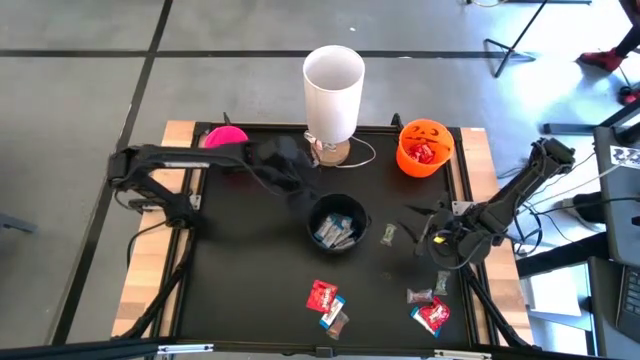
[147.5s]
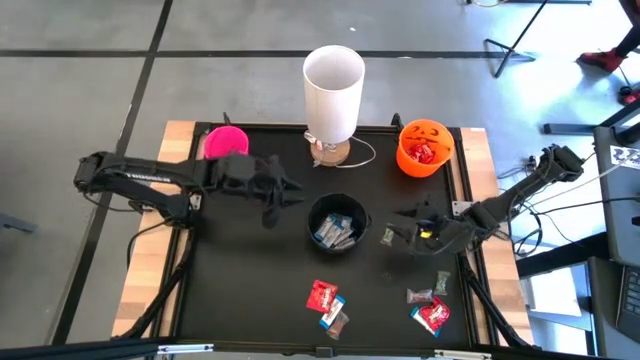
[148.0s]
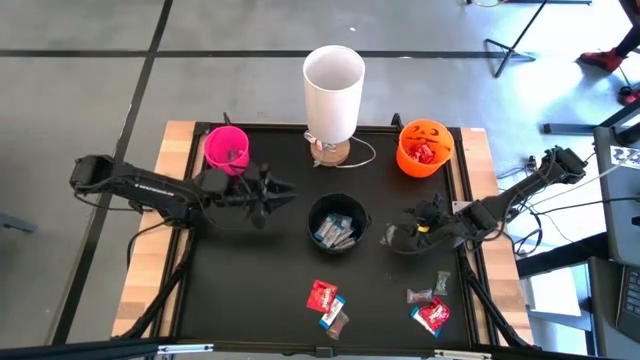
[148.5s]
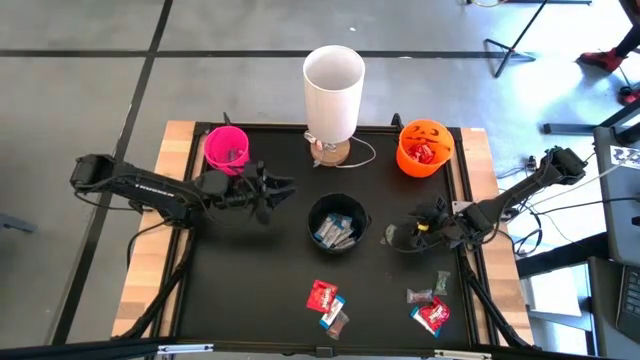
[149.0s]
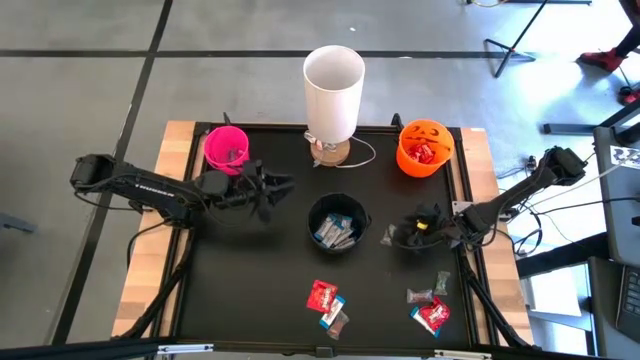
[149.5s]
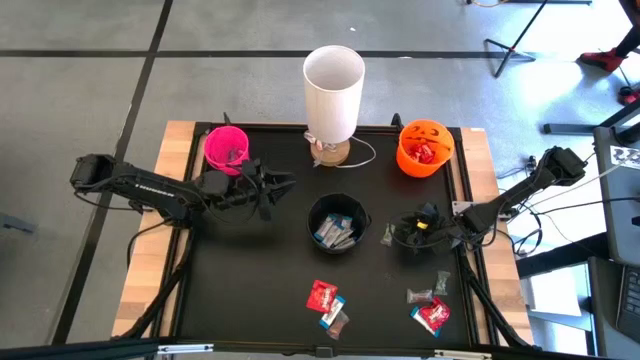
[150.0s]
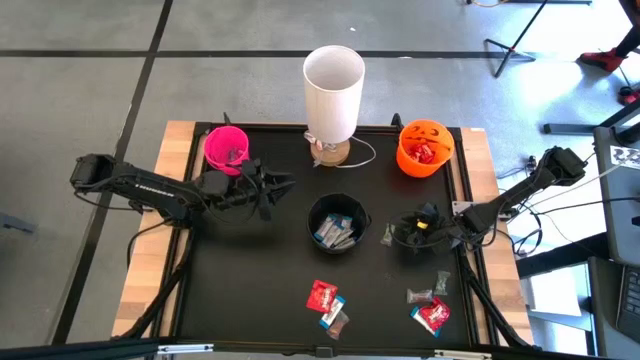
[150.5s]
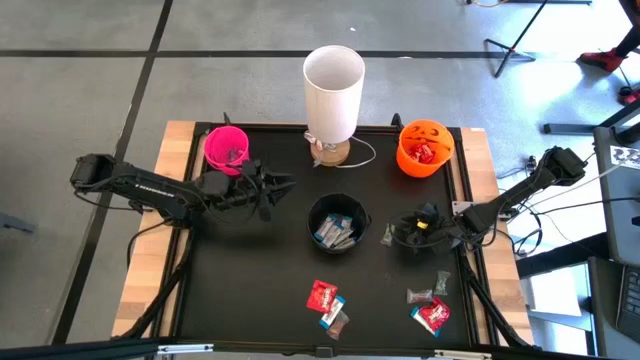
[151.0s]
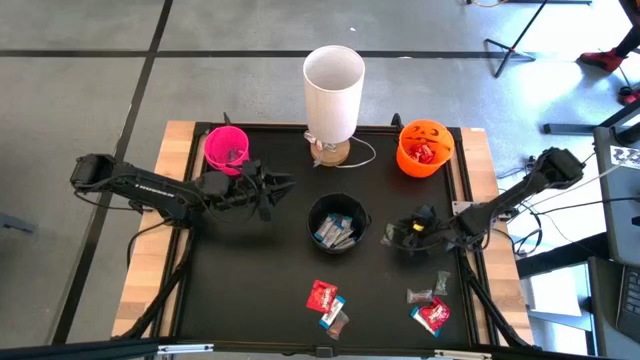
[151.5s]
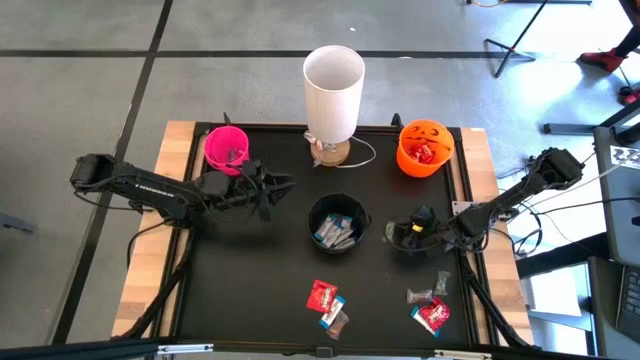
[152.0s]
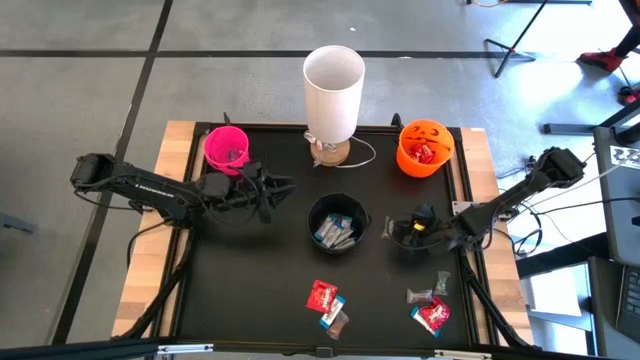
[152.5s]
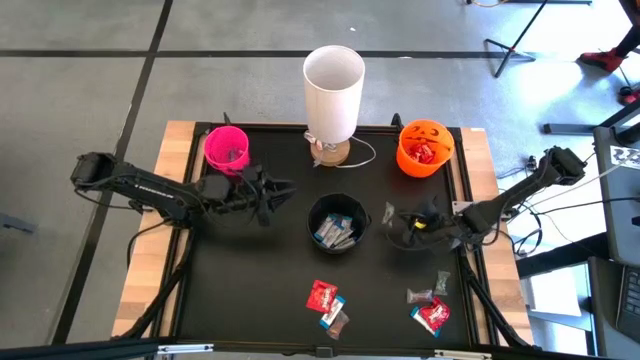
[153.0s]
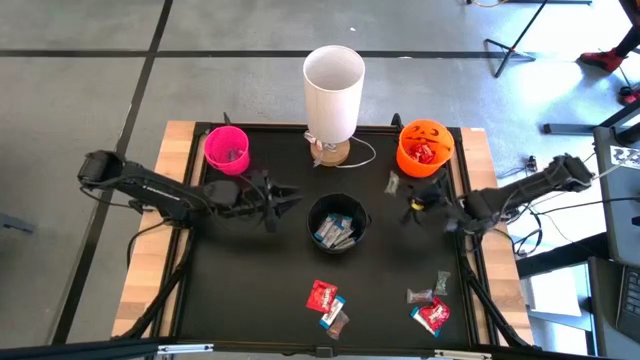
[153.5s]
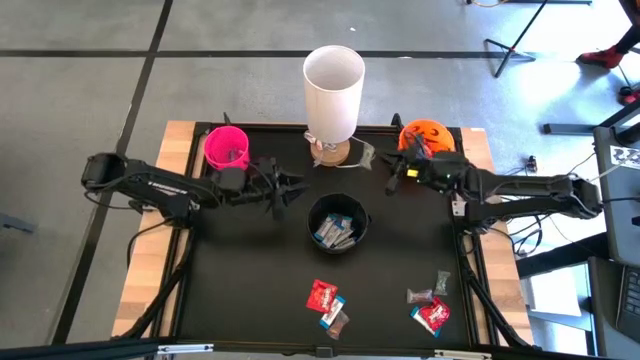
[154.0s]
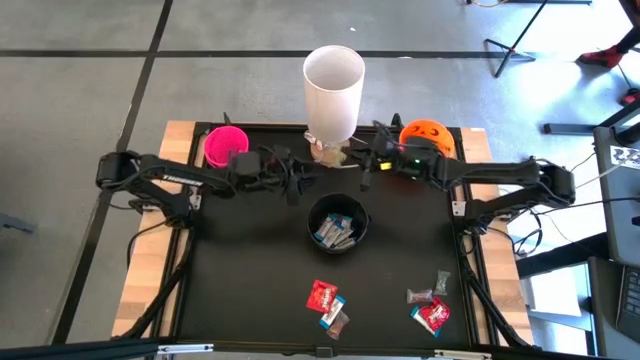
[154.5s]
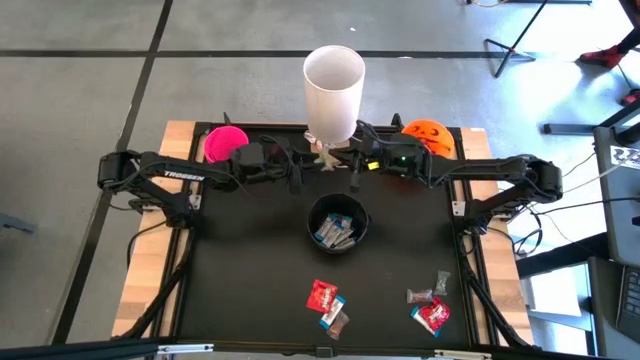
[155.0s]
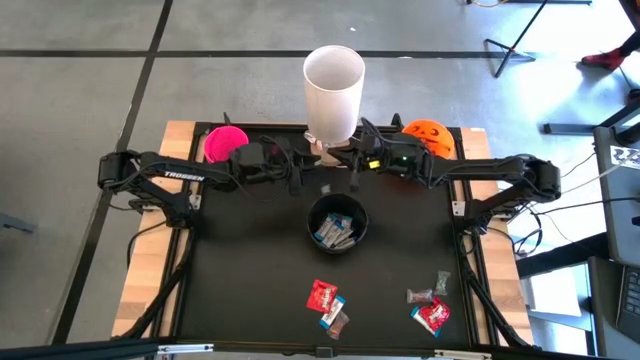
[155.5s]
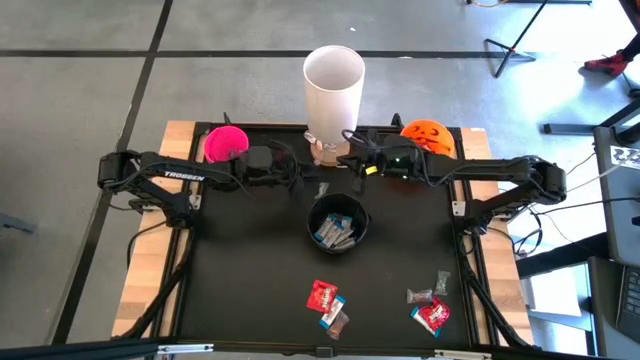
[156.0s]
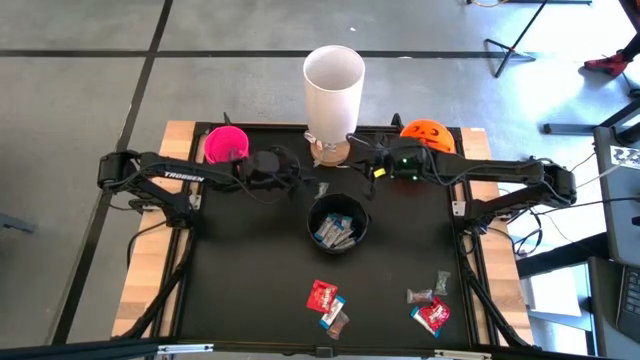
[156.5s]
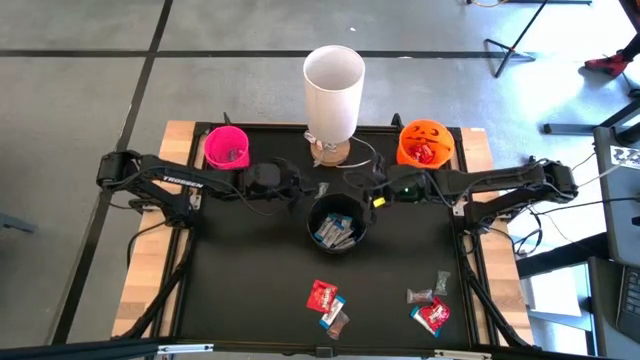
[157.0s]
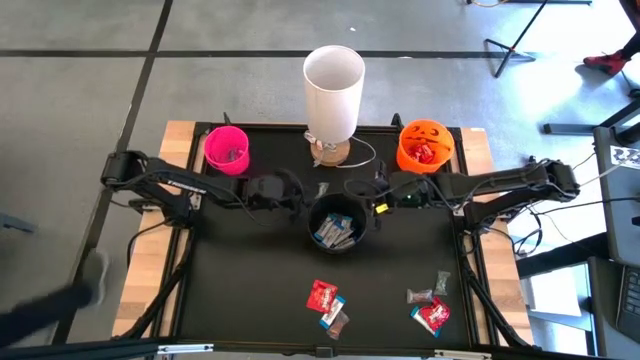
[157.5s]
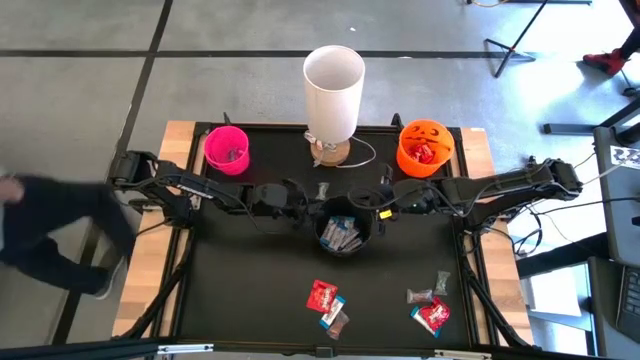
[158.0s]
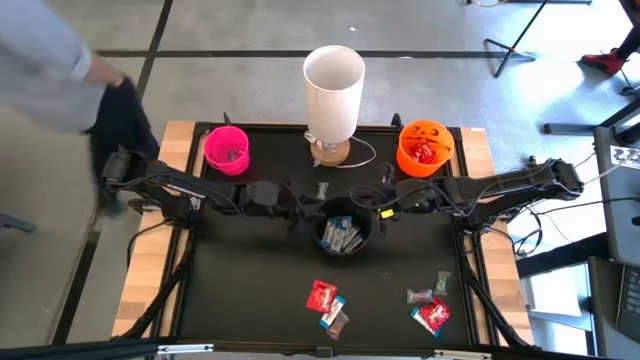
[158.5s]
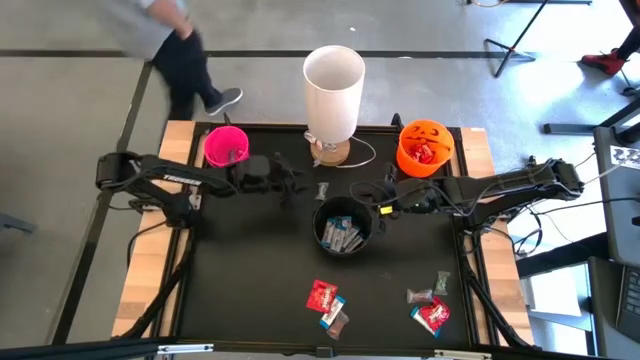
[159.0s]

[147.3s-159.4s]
Task: Sort candy
Put the green gummy into the pink bucket

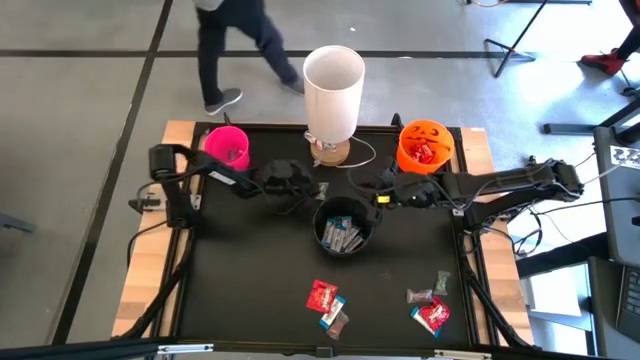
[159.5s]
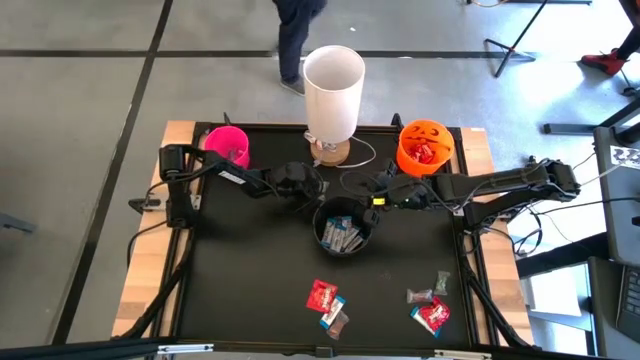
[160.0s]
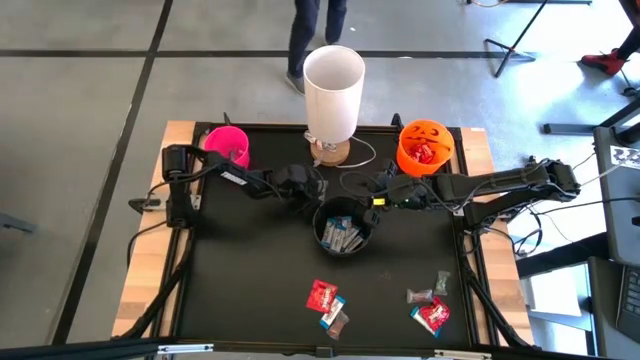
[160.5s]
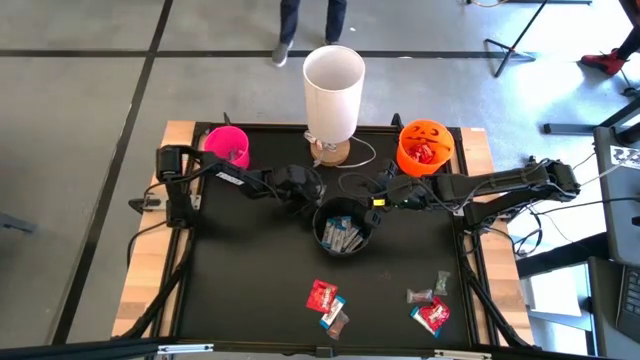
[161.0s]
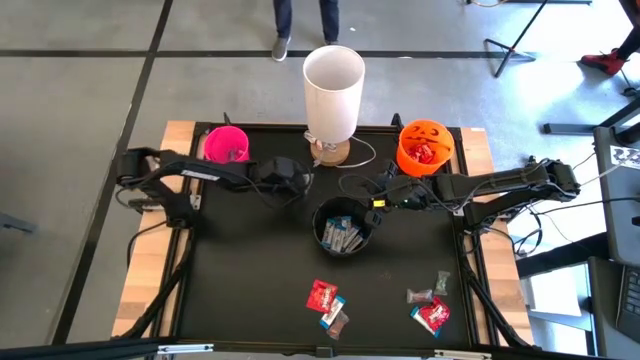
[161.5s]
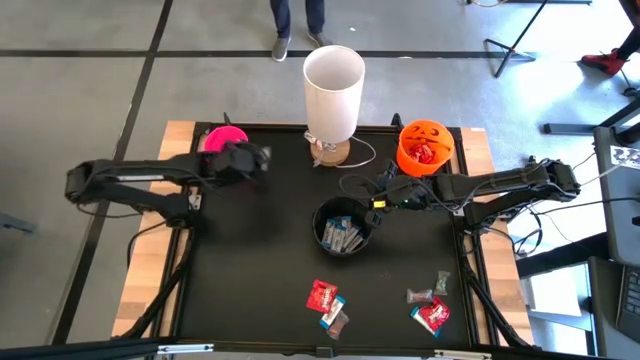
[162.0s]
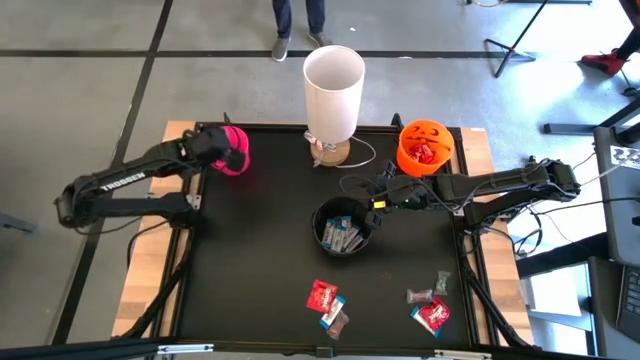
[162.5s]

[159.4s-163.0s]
Put the green gummy into the pink bucket

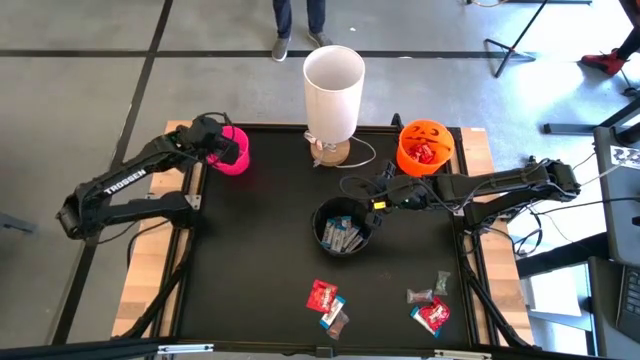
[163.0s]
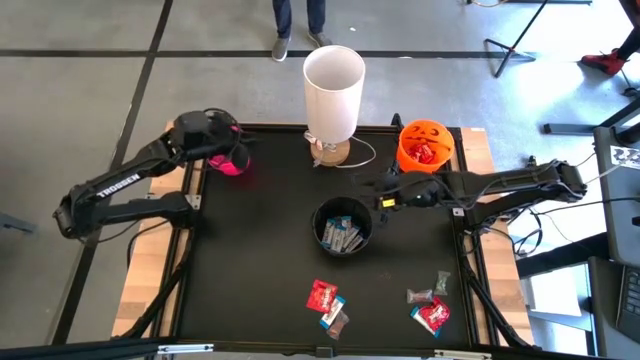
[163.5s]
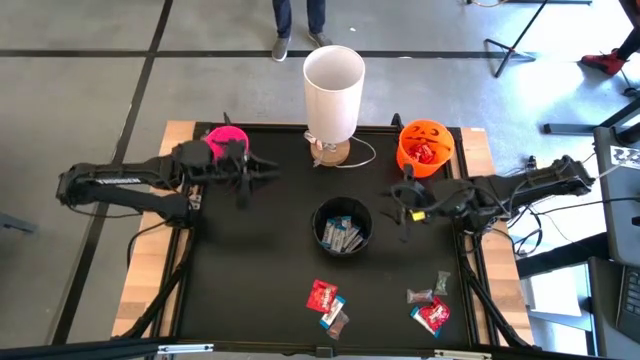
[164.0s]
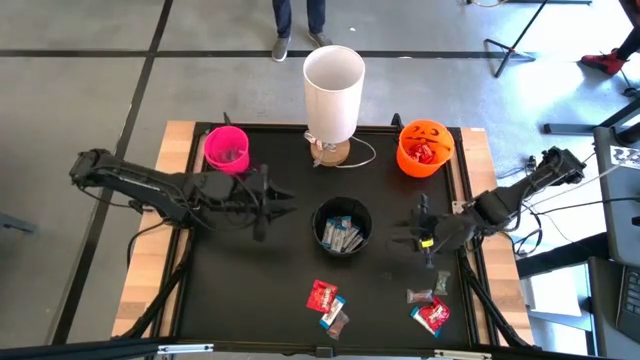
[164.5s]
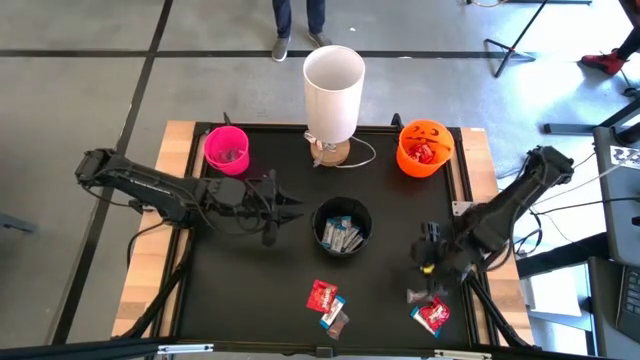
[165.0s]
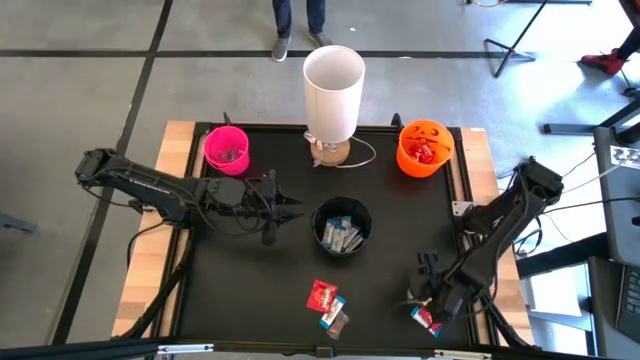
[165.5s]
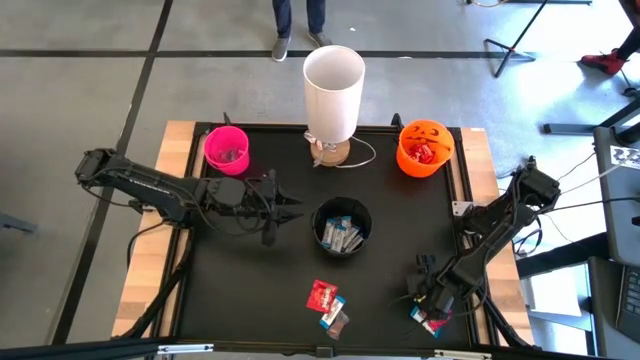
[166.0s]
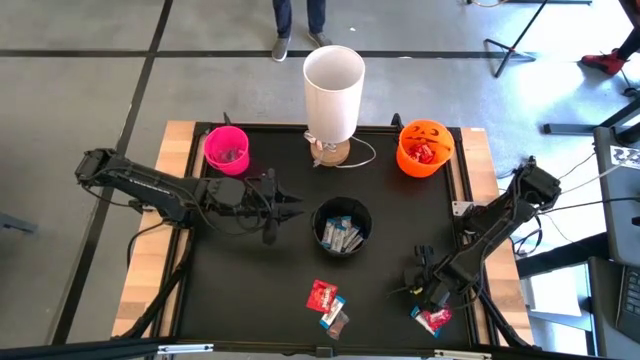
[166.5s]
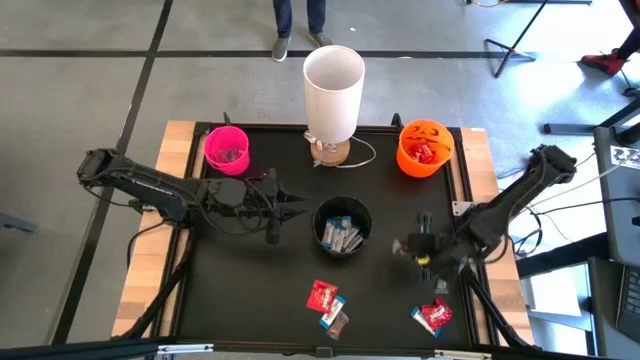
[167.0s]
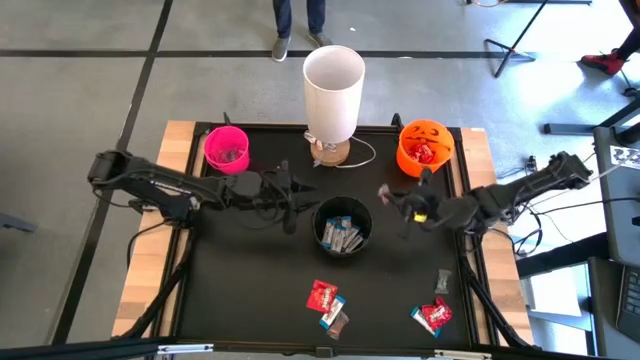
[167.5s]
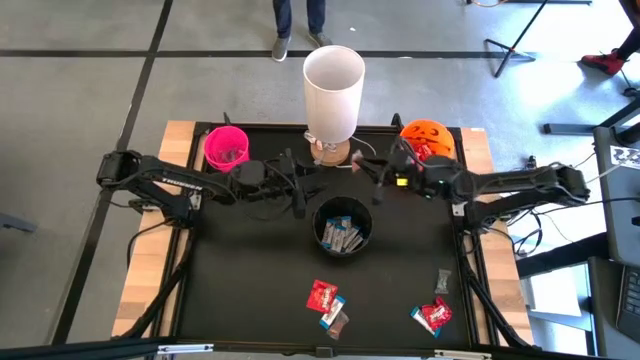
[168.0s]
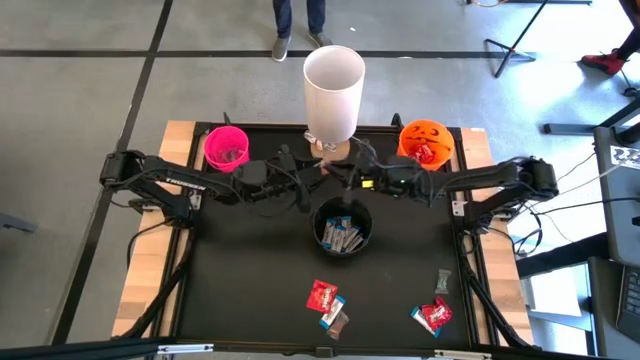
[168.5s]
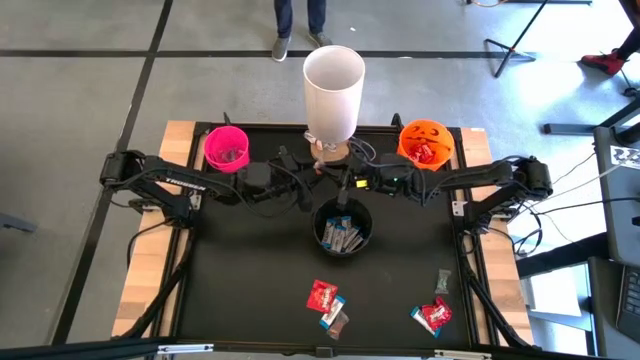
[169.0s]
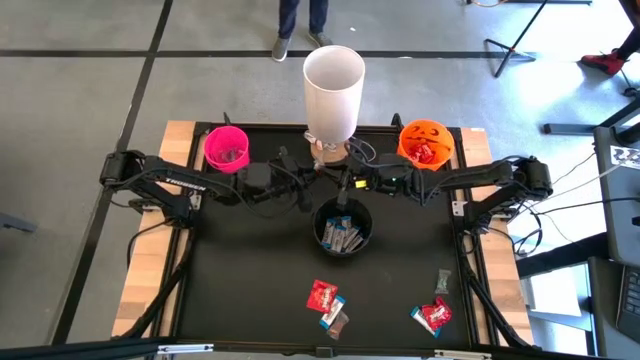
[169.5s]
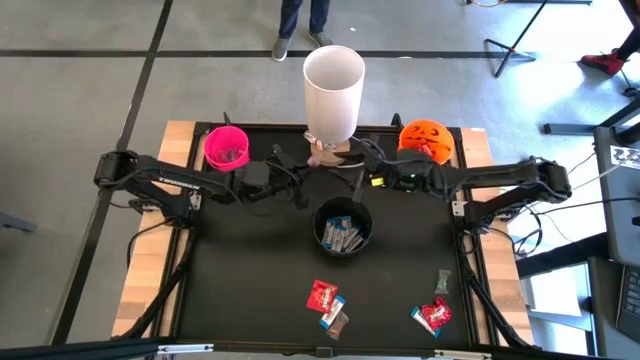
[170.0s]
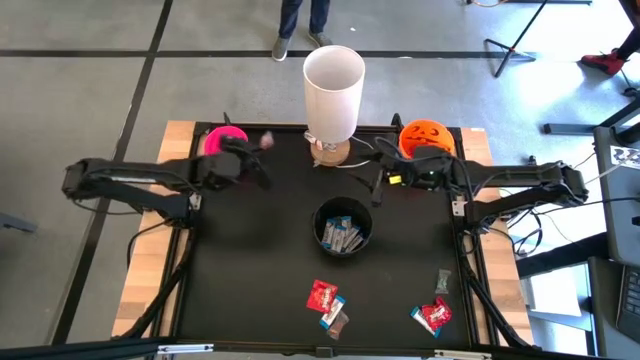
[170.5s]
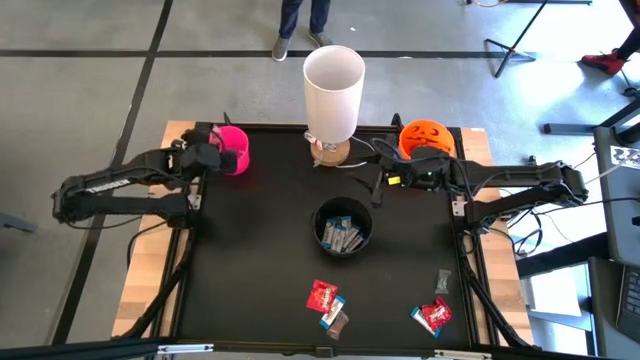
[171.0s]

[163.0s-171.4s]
Put the orange gummy into the pink bucket
